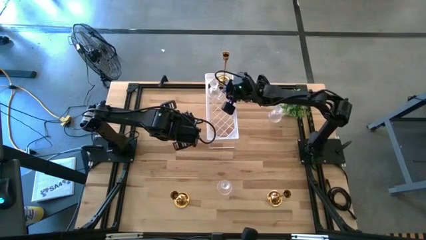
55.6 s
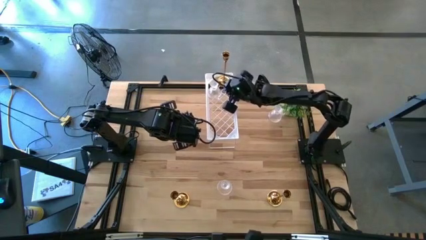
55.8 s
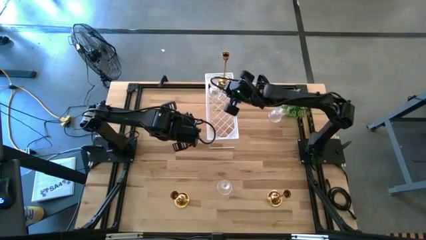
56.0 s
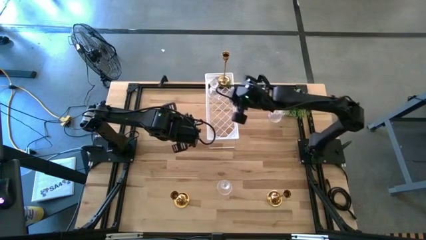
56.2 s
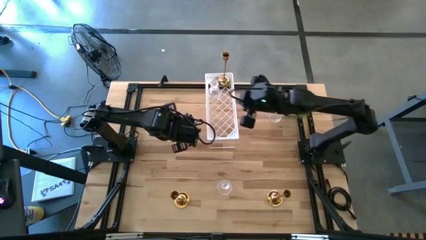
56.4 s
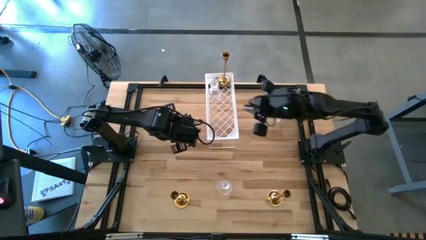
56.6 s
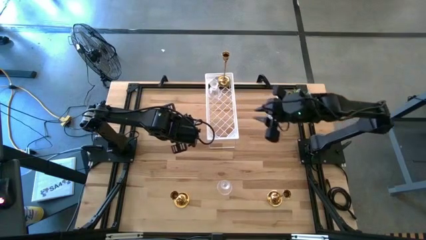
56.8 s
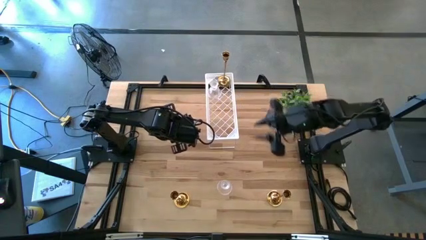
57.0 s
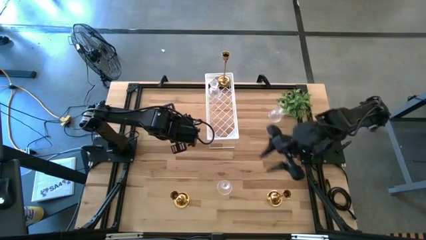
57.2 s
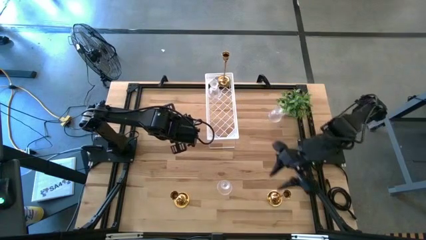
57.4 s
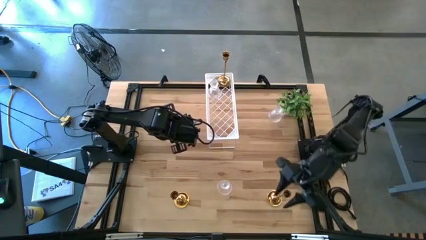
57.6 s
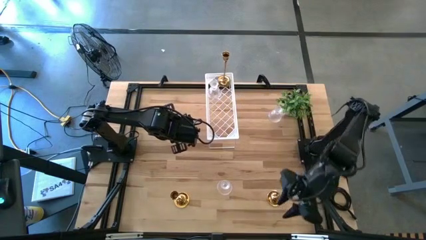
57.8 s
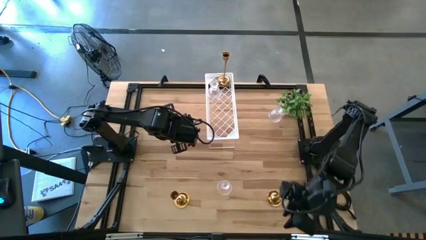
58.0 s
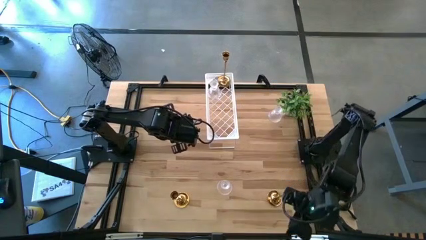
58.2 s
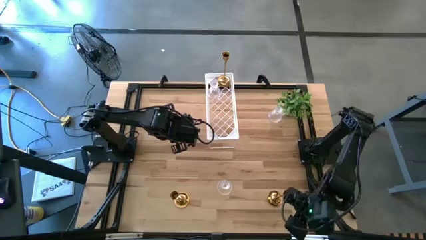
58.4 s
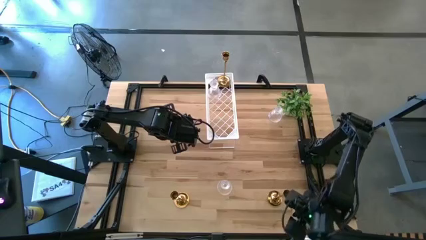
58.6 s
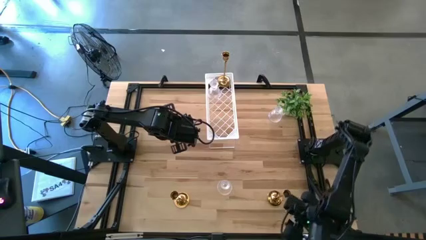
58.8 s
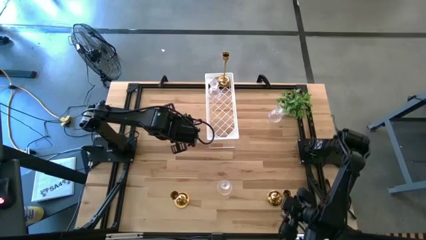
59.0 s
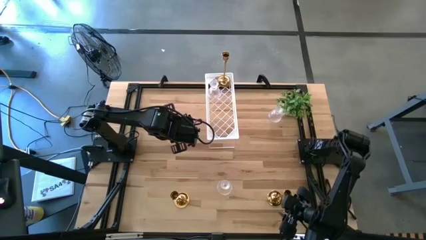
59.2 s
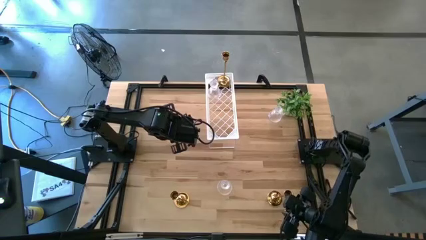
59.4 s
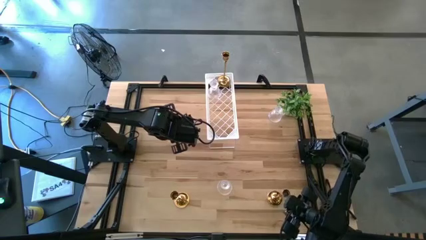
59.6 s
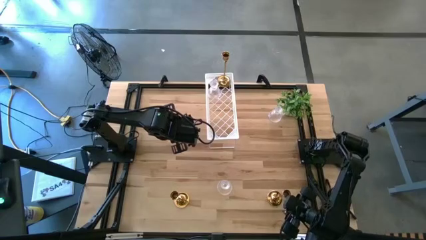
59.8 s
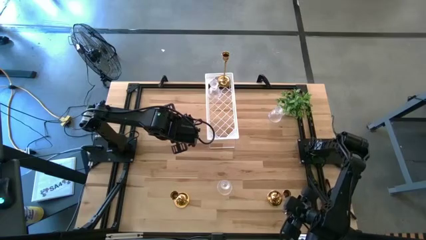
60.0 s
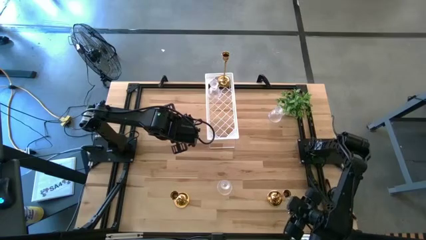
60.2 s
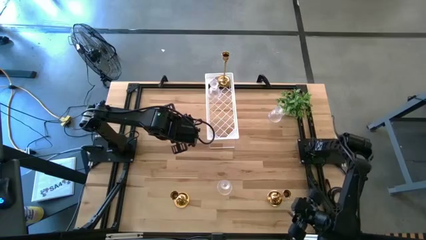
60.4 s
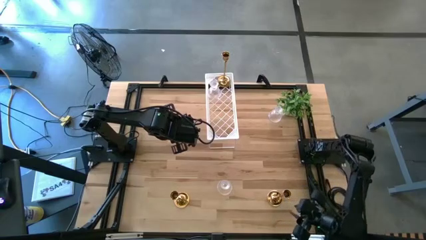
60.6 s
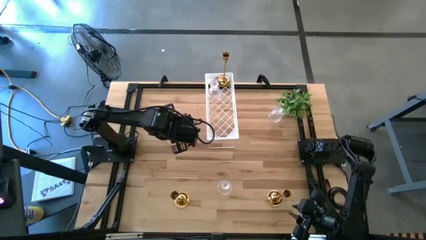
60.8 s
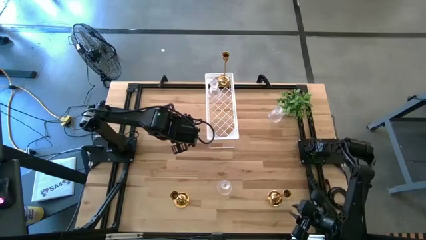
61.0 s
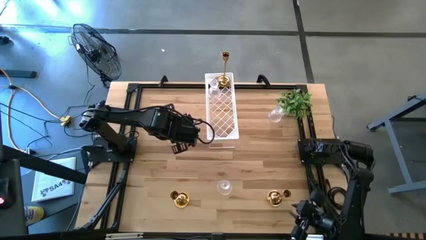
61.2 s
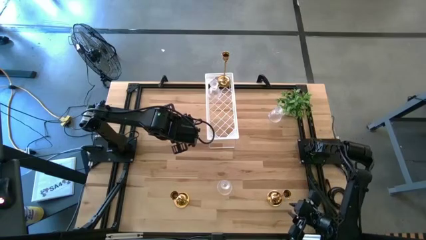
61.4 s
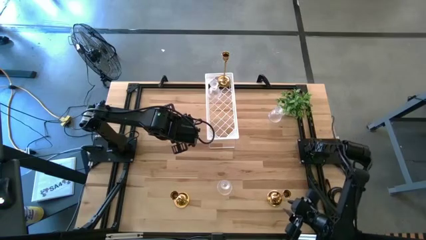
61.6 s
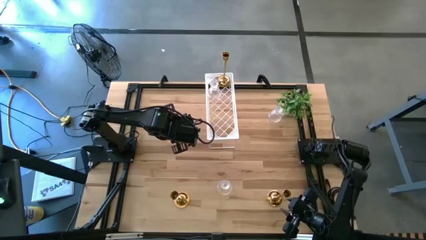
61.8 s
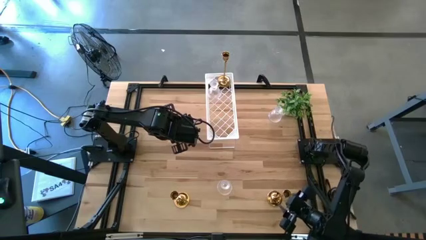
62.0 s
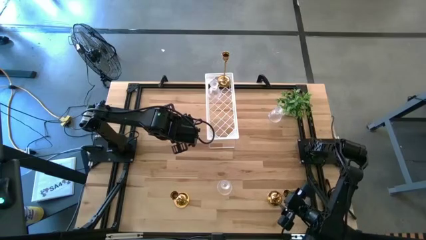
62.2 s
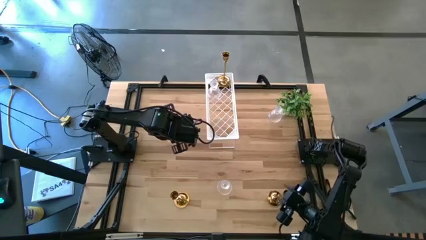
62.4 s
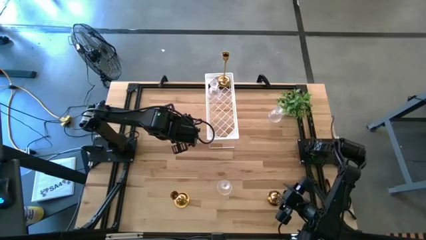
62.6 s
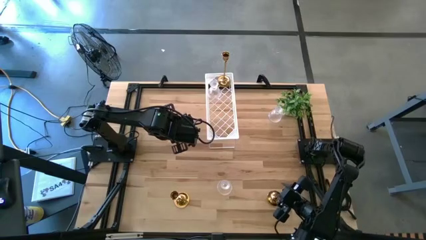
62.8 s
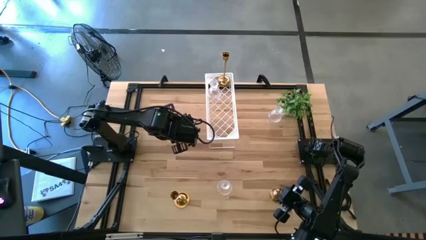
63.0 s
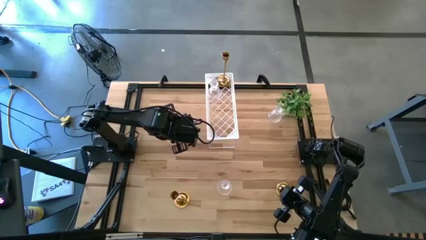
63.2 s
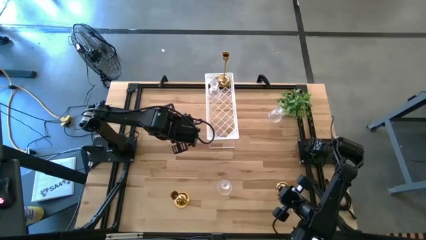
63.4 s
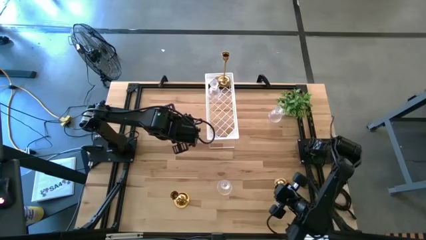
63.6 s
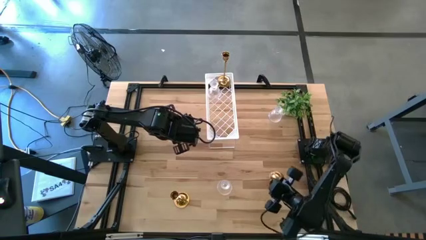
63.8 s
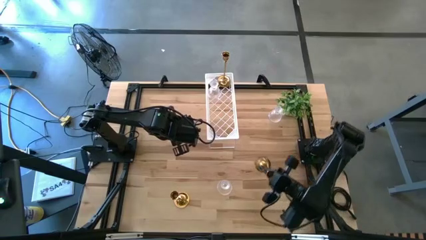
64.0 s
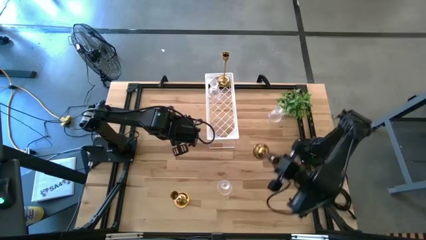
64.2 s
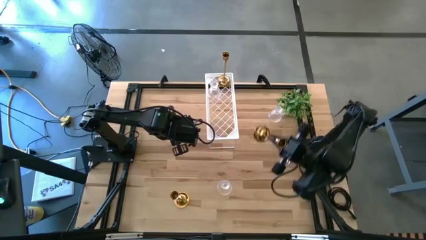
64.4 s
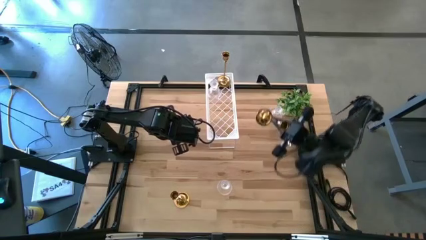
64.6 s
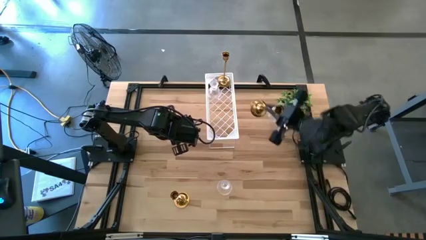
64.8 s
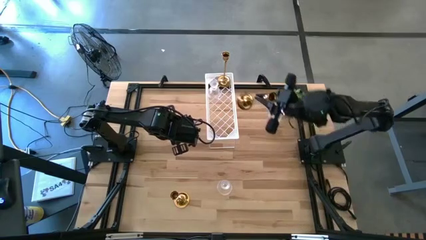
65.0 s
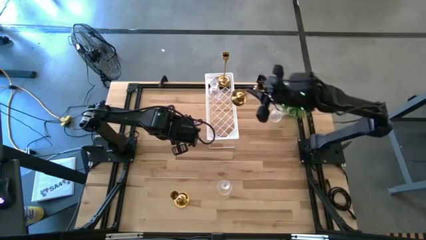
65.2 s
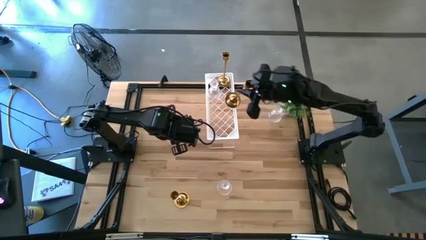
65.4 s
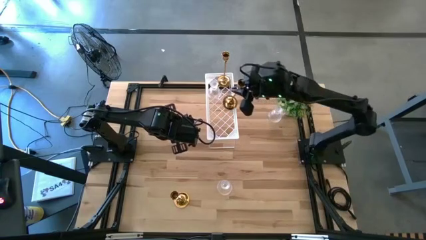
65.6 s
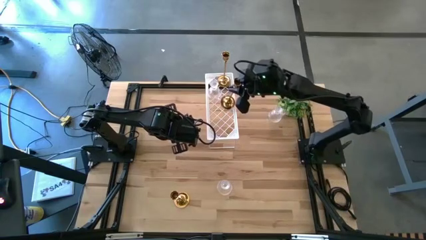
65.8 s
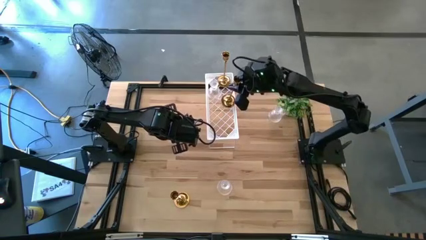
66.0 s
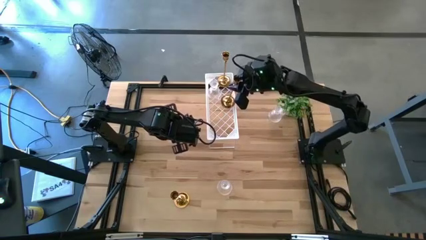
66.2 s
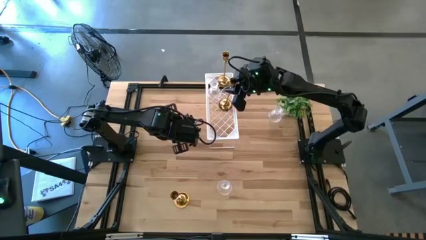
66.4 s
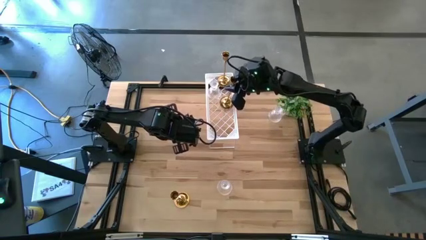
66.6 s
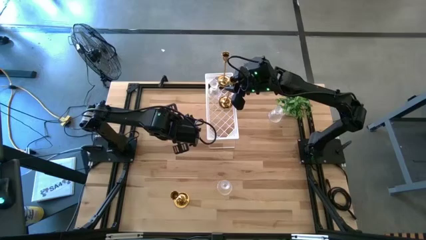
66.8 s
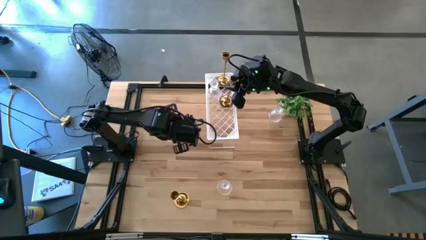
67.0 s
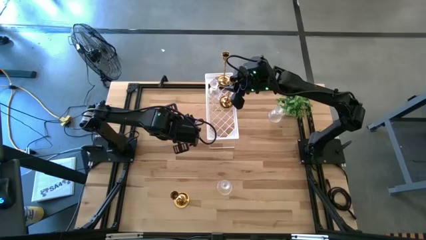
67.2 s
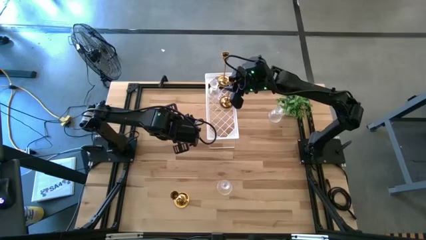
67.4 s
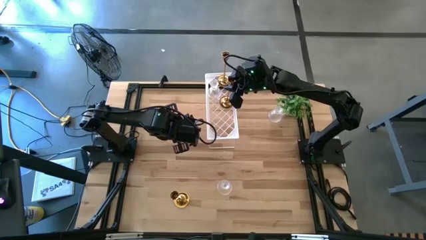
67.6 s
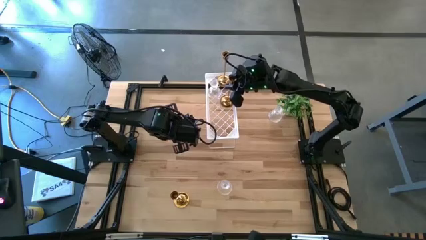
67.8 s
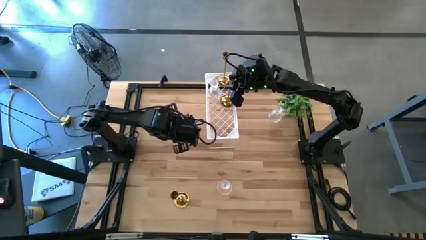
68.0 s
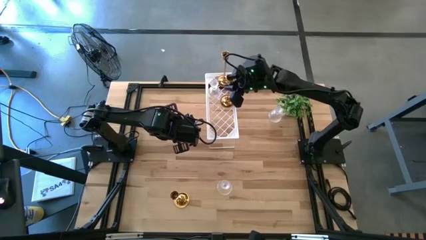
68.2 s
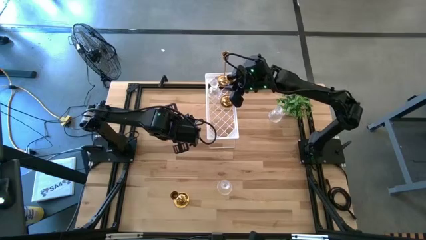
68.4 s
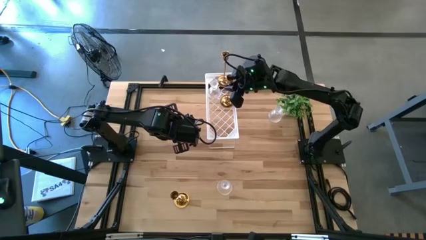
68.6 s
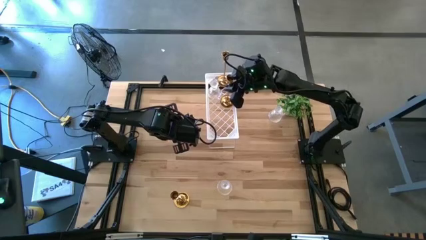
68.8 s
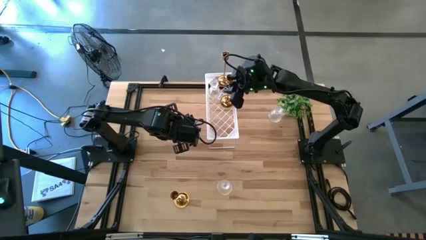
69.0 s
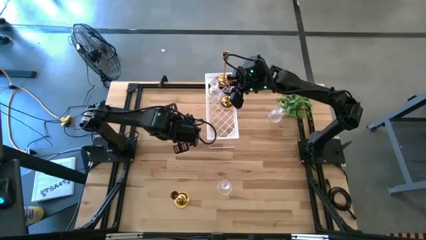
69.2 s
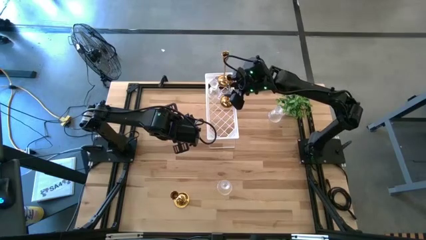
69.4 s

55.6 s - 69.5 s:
Task: Pick & Place candle stick holders
Put the right gold candle holder on the shelf aligned with the other gold candle holder
